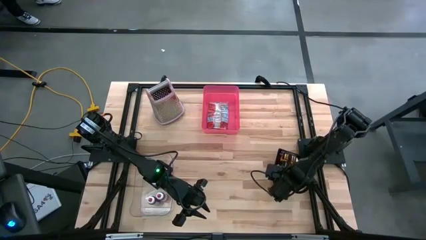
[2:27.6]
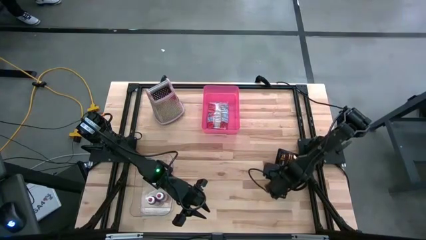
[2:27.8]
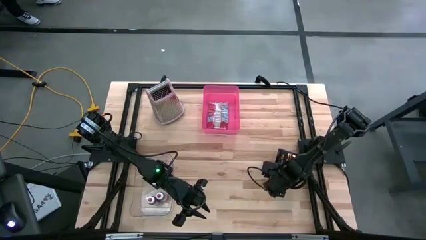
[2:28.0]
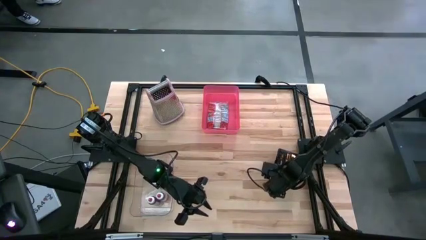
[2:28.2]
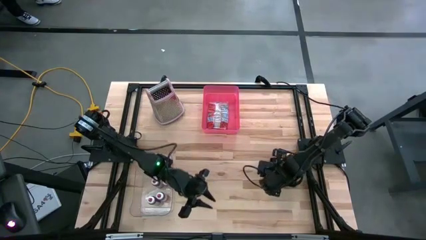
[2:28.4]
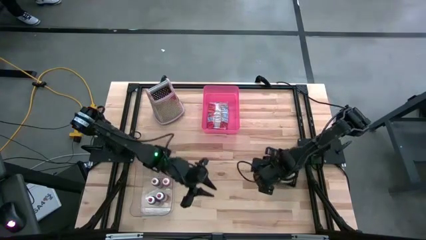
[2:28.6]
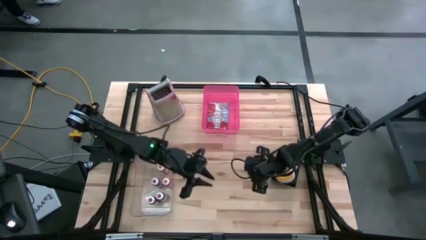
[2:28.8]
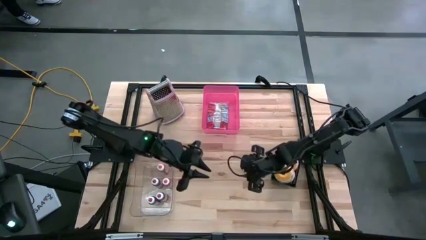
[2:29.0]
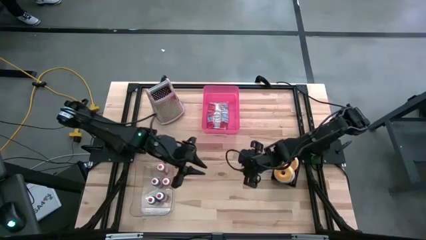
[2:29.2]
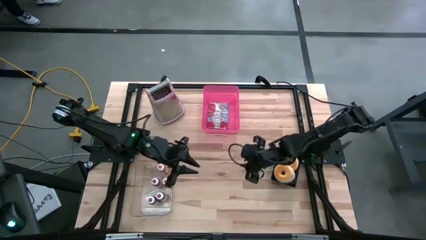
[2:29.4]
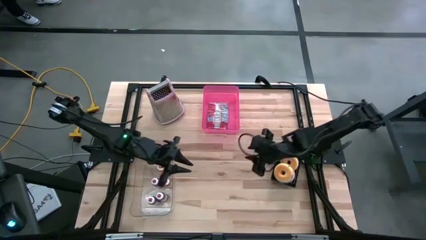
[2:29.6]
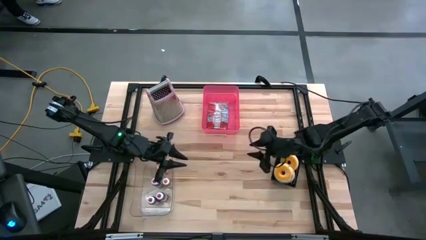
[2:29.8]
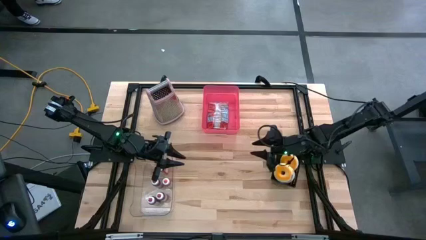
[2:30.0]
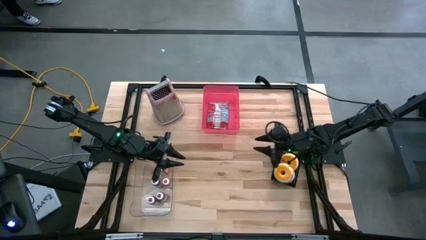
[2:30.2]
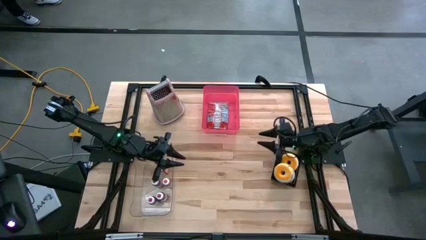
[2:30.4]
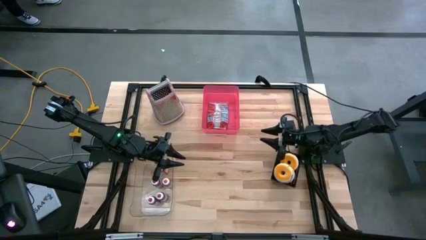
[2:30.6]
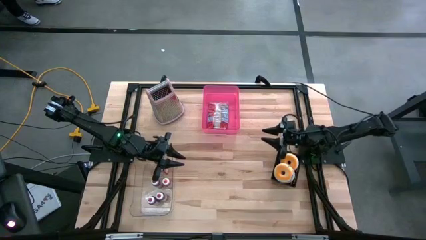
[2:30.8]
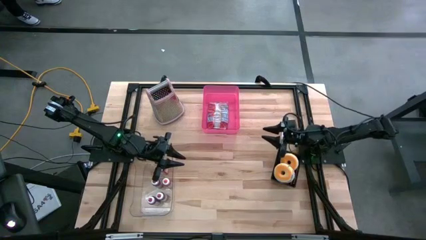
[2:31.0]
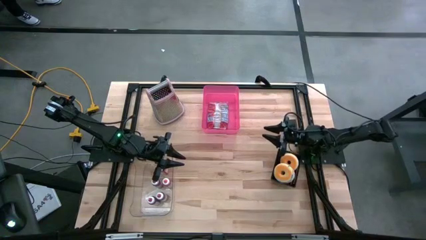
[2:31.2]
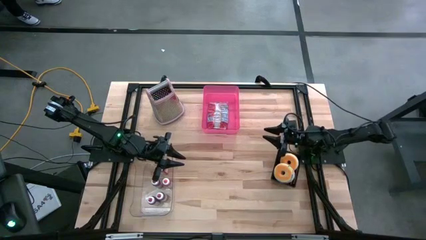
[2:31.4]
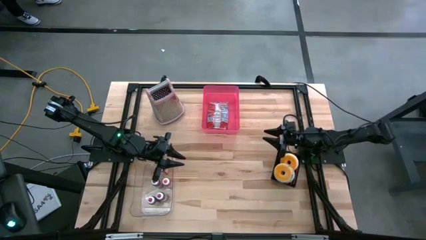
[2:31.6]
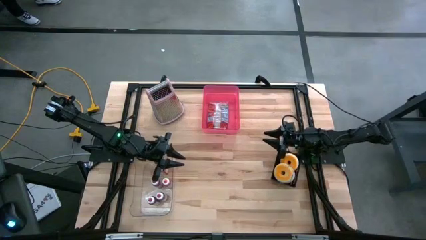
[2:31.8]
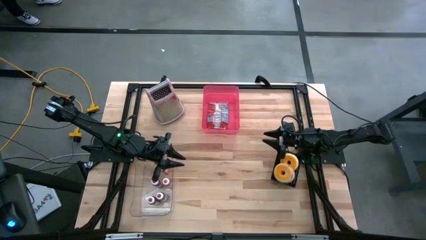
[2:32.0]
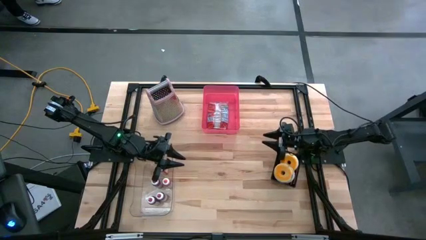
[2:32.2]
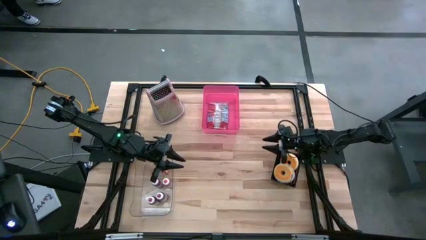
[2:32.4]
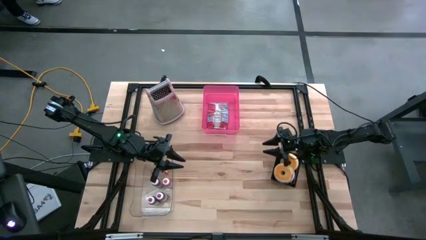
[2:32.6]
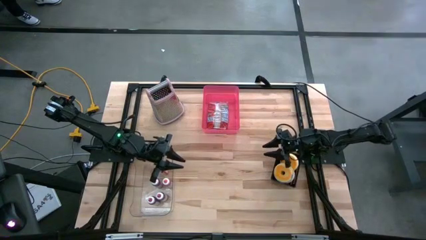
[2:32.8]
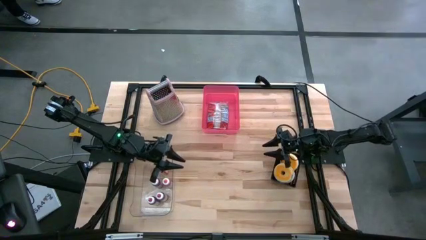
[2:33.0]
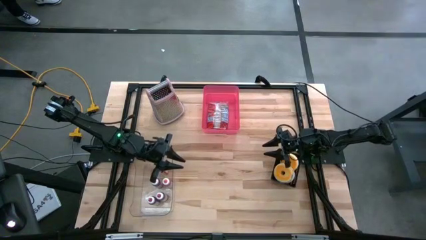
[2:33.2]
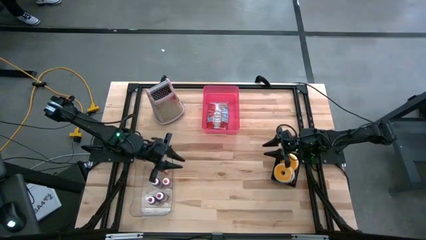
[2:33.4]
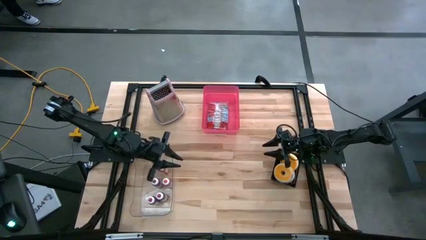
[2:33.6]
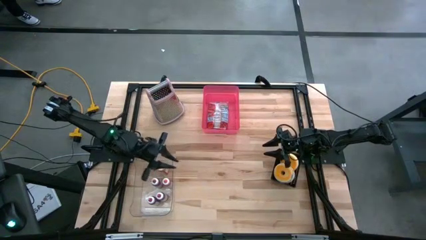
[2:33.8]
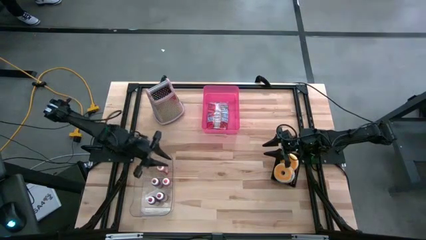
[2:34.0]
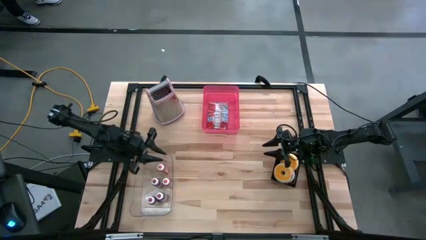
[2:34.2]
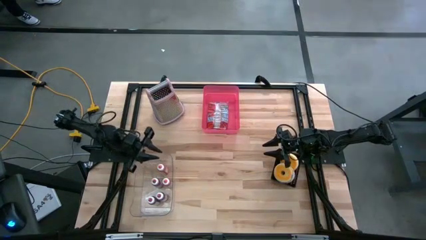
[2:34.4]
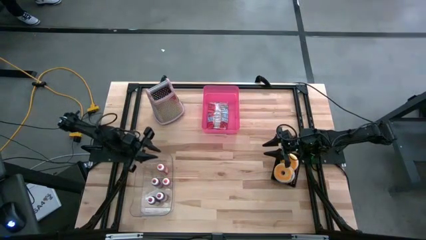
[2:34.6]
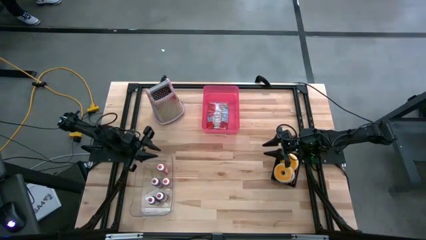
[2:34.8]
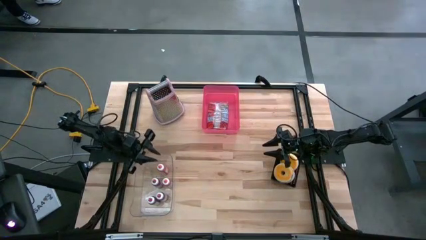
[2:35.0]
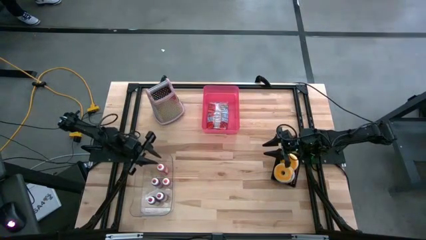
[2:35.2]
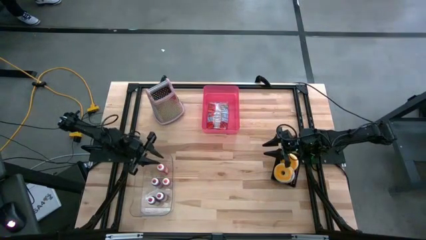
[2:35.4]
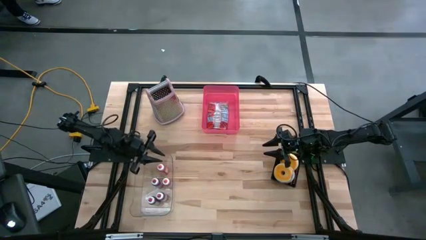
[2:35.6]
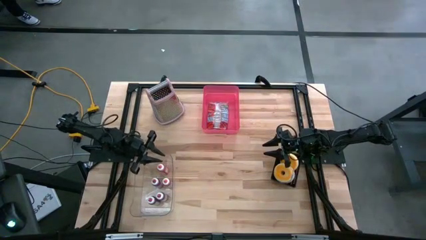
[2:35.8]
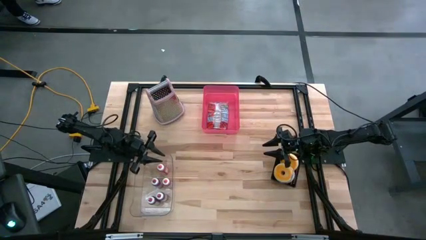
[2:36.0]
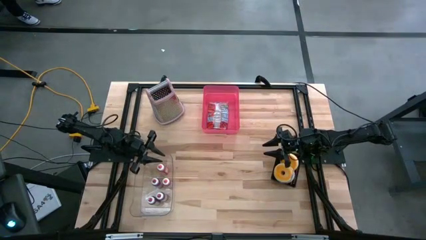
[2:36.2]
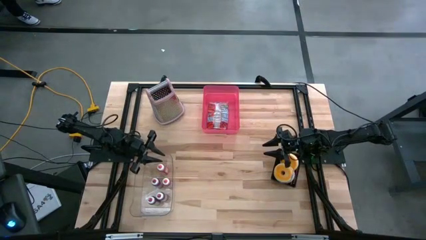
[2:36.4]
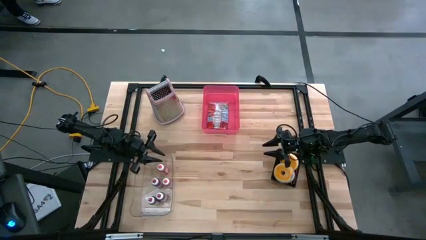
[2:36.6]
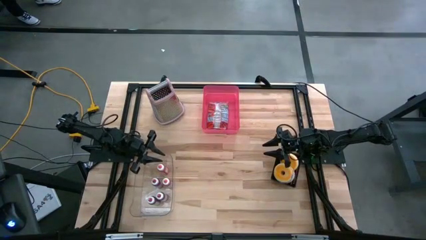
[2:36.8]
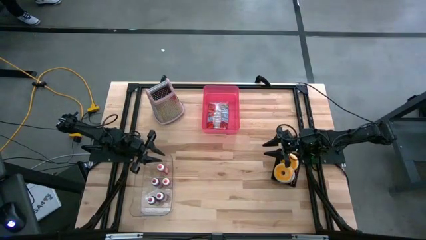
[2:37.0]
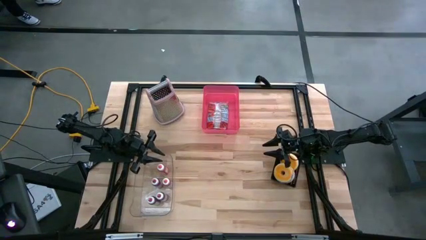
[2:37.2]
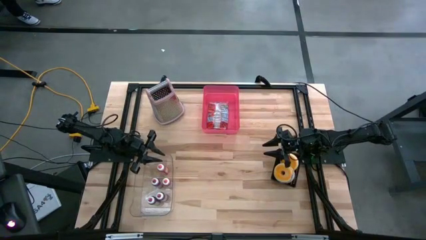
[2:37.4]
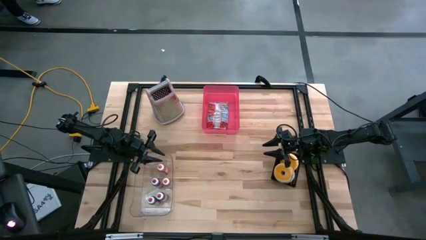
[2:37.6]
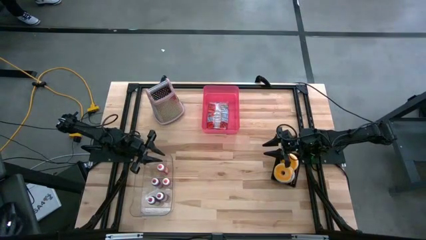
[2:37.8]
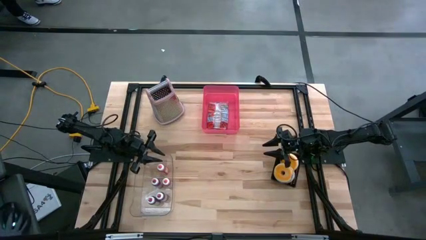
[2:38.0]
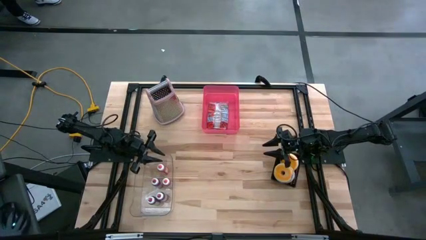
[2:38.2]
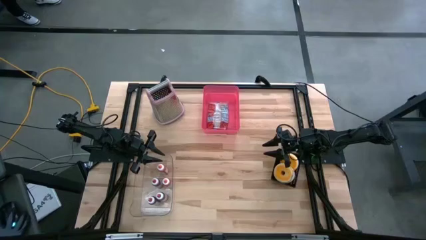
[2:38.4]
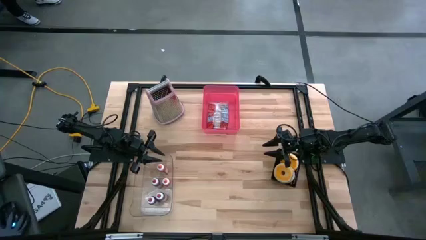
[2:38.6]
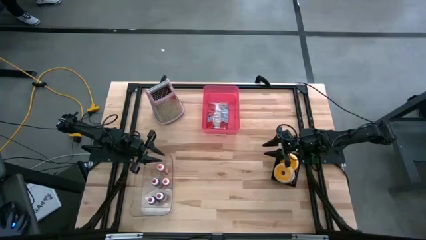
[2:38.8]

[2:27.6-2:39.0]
Return to Home Position

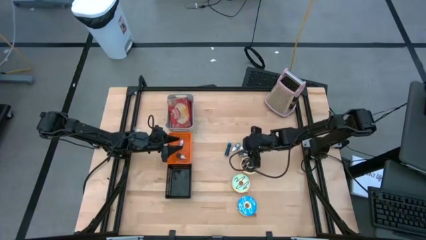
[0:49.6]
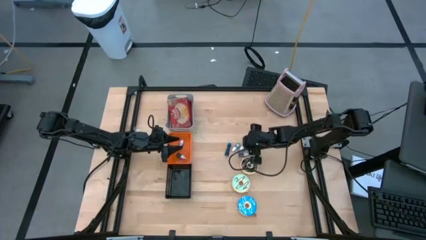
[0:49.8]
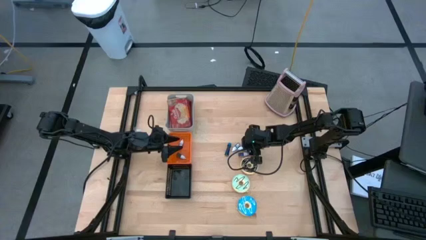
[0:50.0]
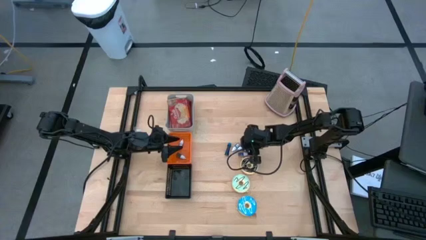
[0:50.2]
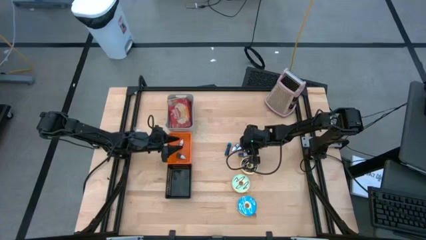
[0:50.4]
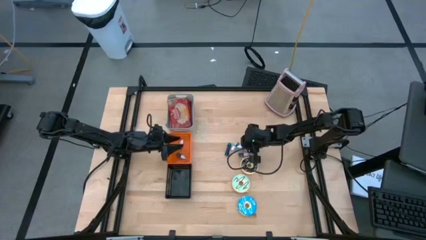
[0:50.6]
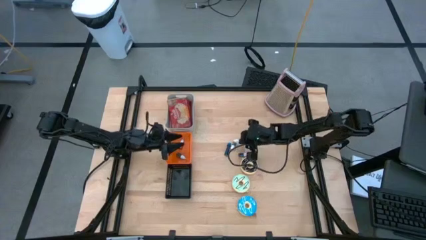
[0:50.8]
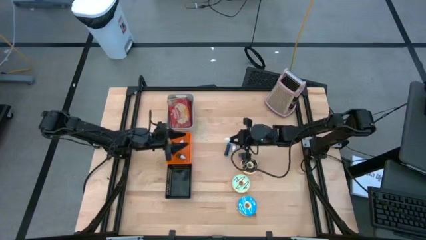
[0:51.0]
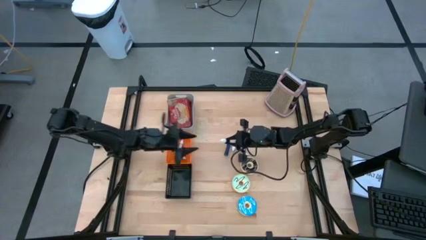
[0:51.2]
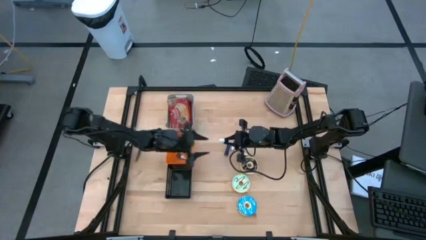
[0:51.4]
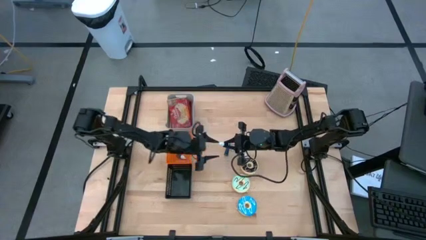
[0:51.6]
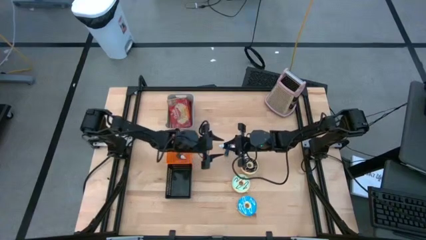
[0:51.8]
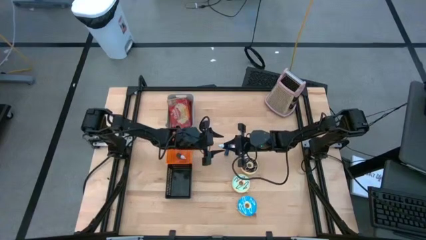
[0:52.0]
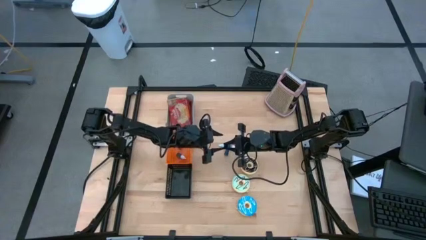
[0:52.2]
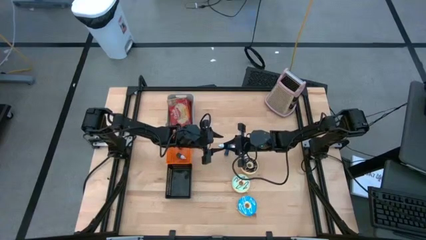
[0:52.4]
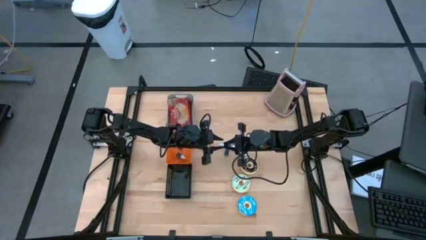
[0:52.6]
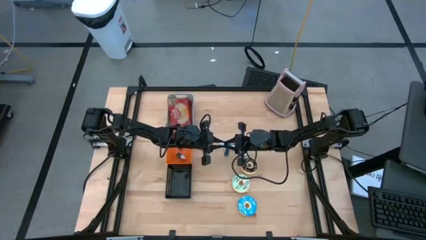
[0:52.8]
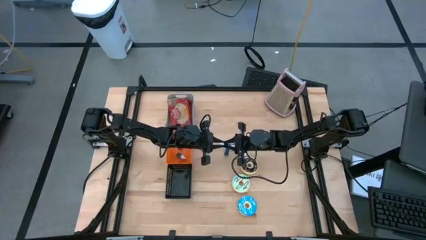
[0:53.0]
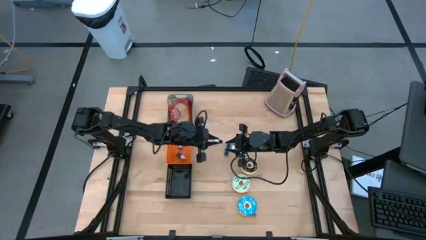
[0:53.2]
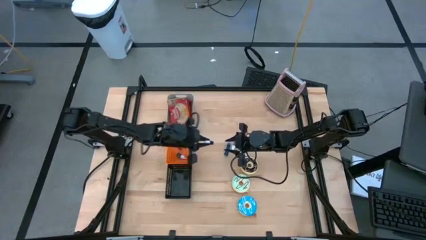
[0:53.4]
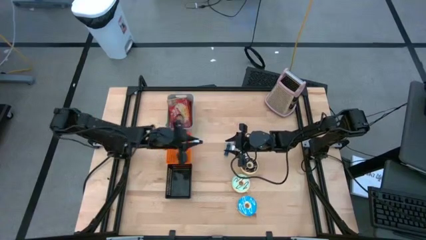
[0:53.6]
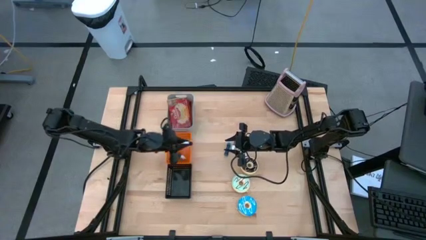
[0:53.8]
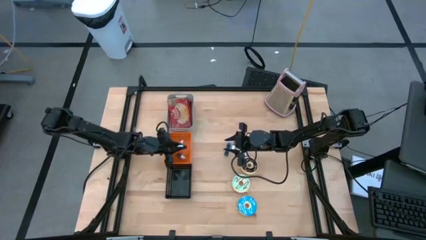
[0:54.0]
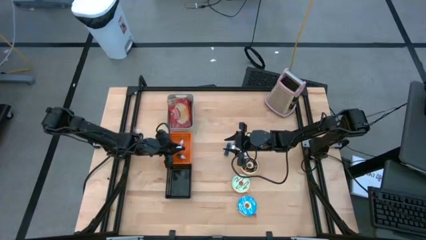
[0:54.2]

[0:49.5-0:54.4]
Put the purple food coloring bottle into the orange bin
